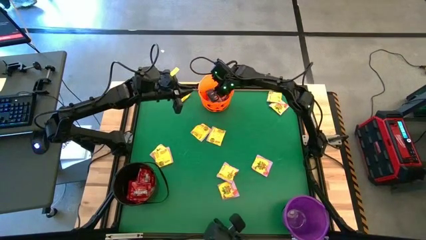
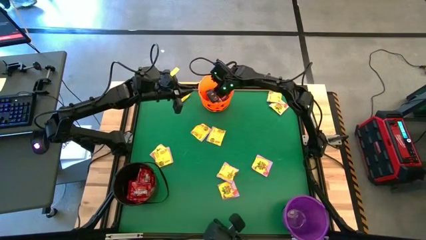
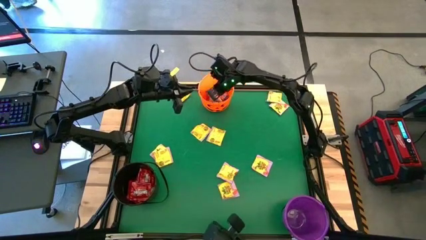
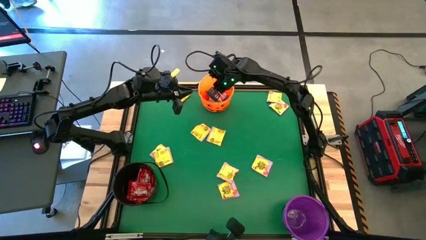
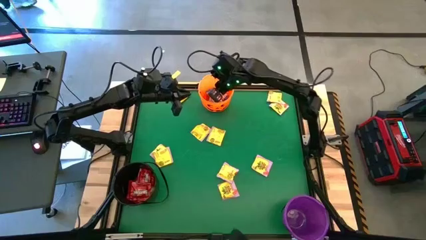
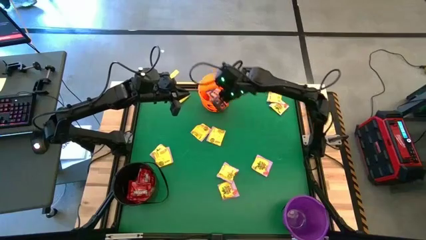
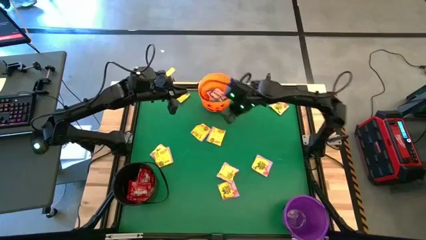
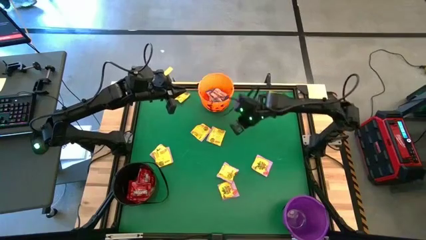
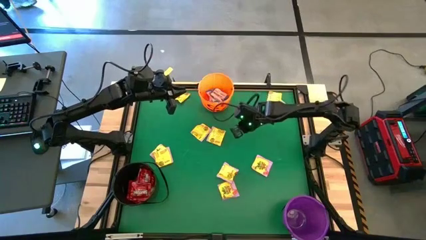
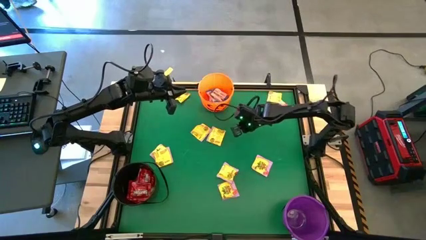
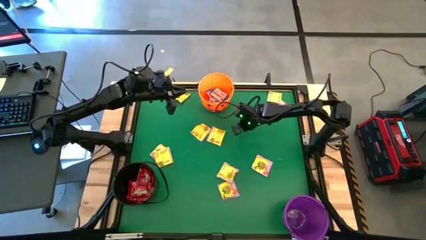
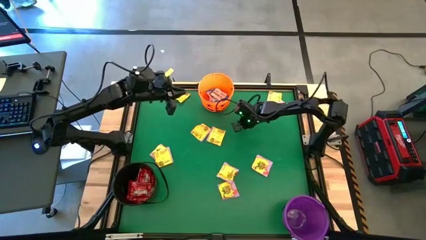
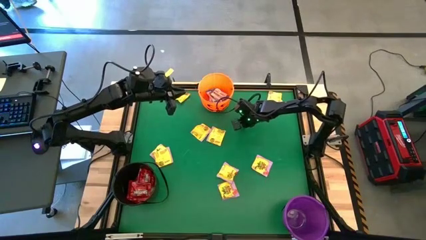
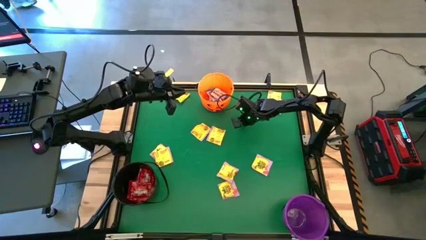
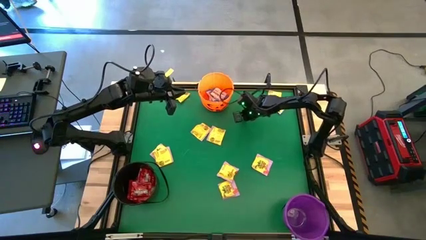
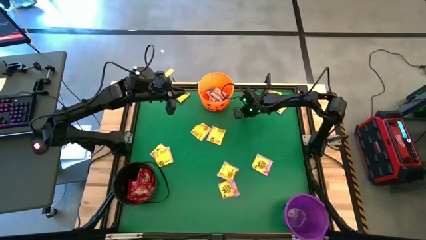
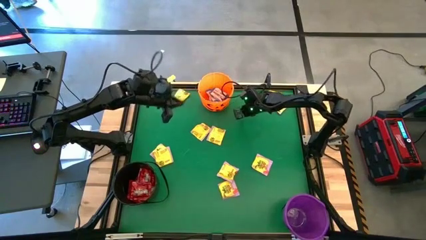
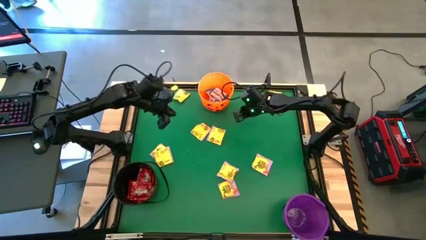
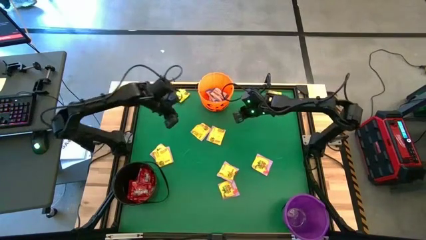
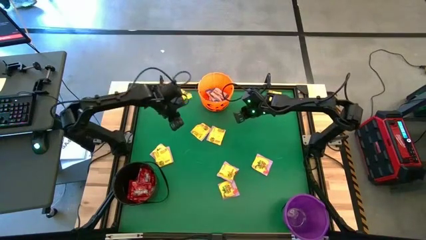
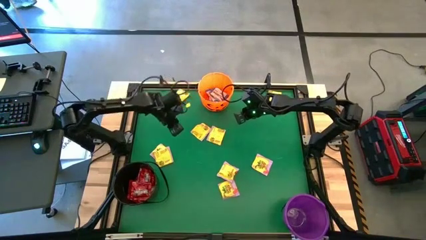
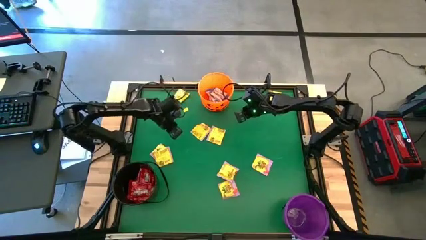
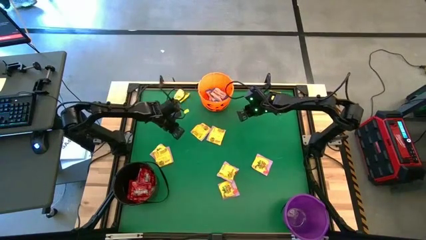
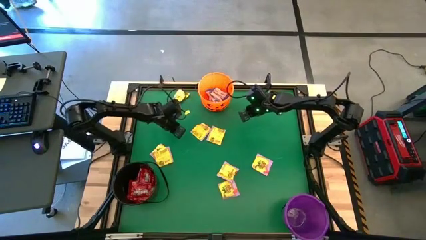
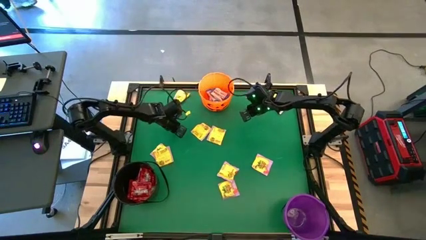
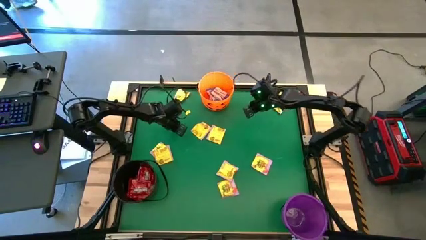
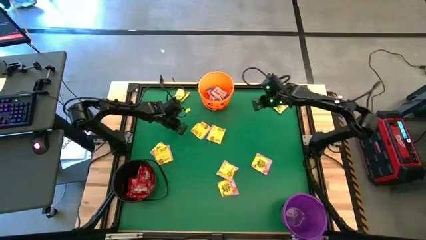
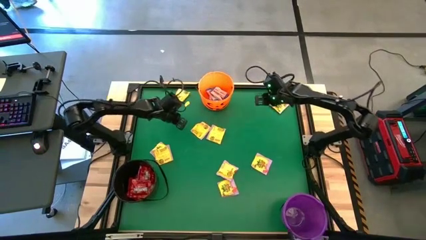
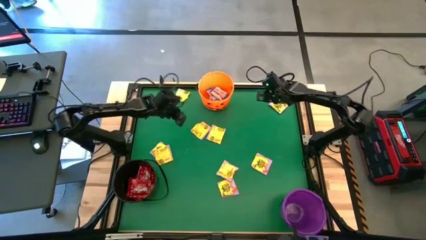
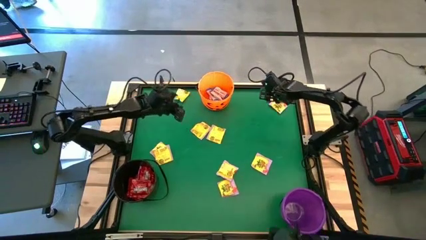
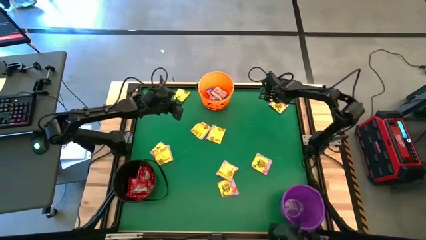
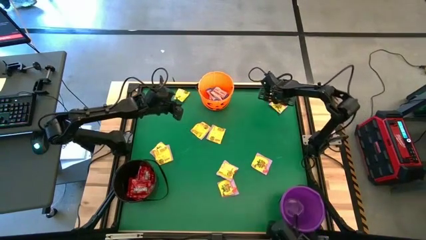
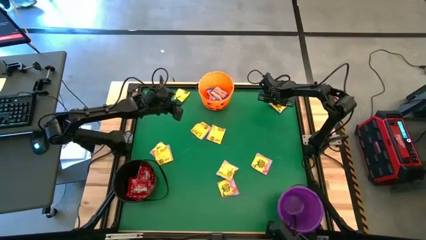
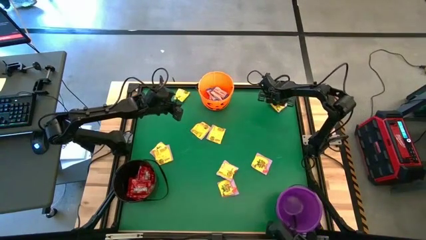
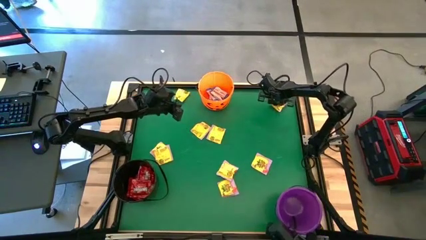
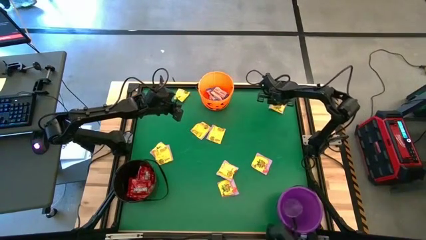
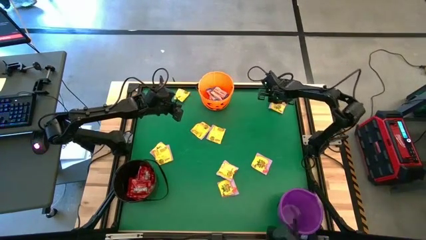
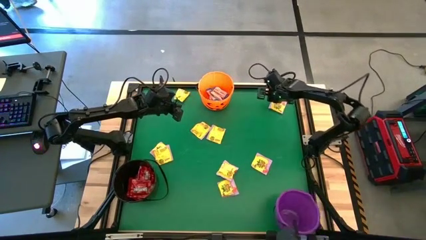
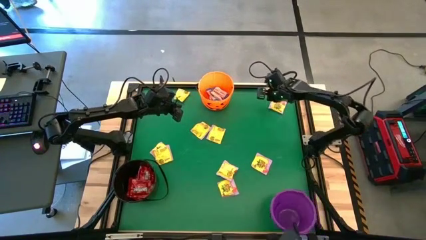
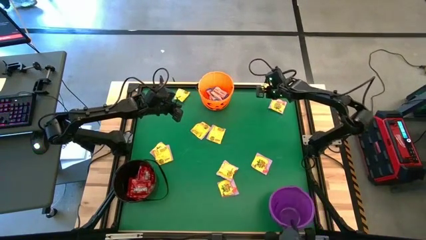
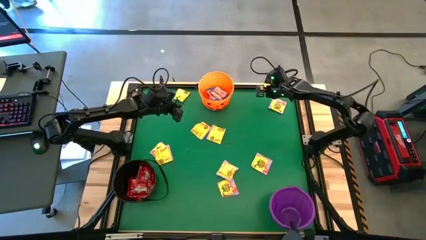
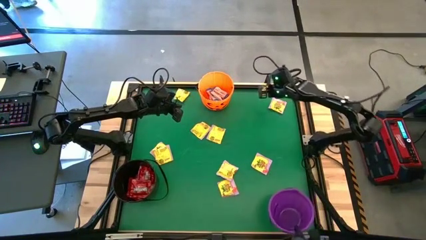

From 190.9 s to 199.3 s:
Task: Sort candy by brand, put in halloween buckets
Put the yellow candy into the purple bucket

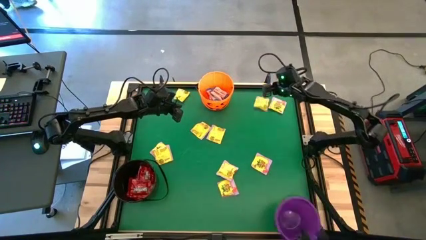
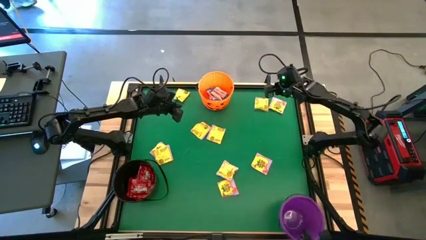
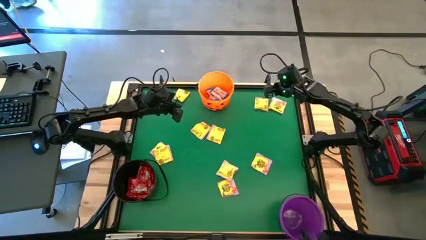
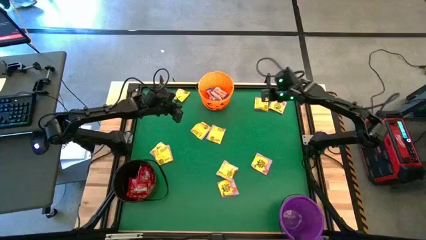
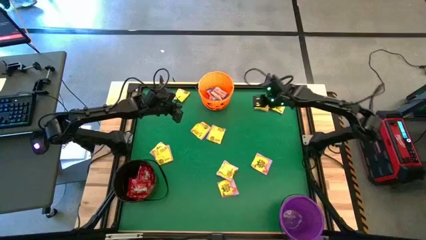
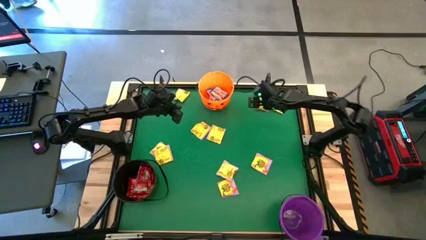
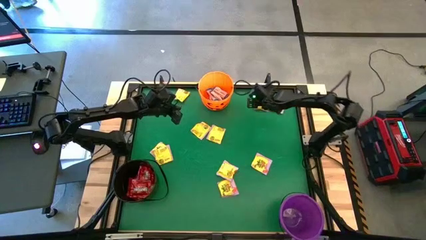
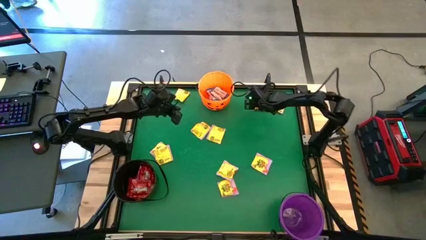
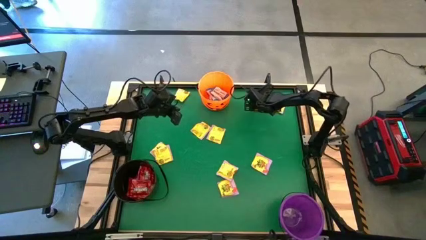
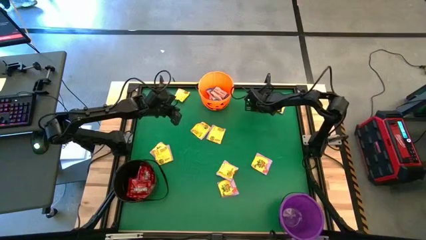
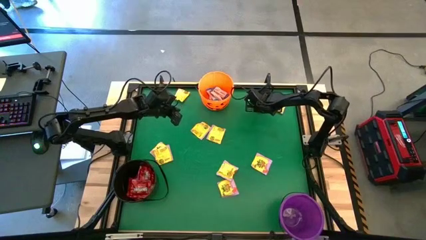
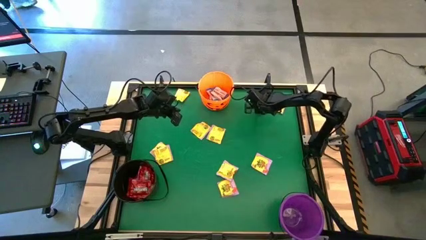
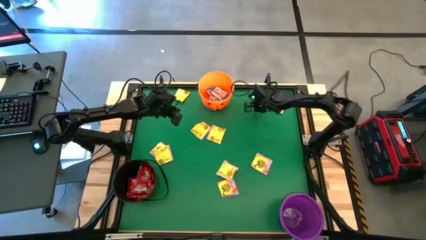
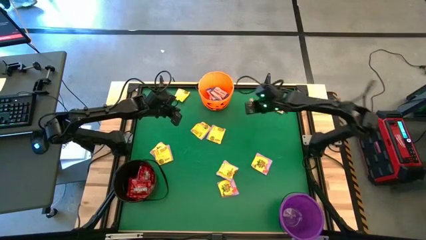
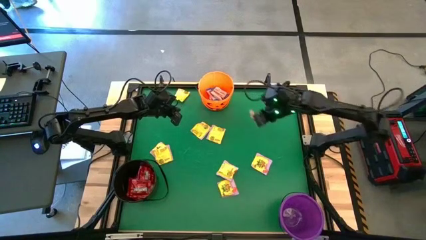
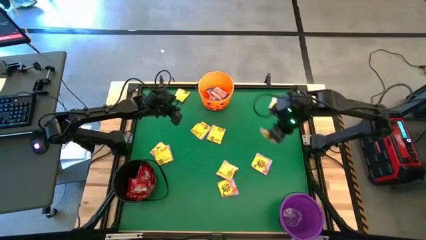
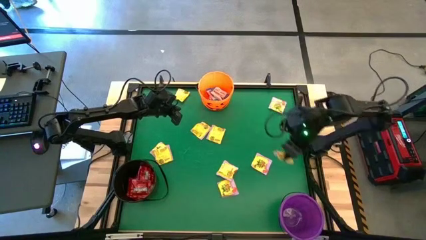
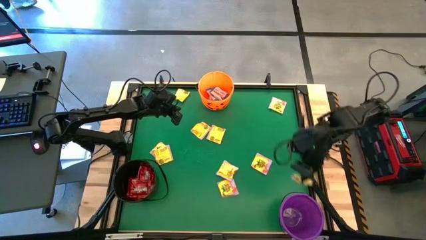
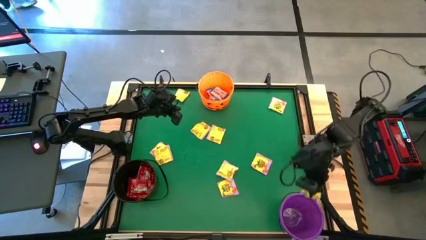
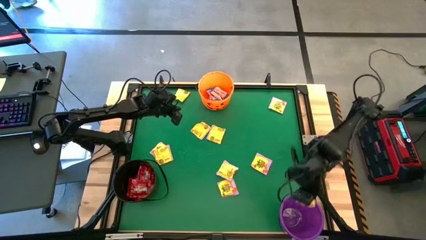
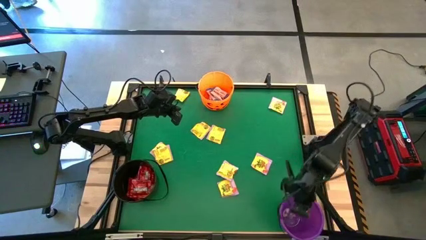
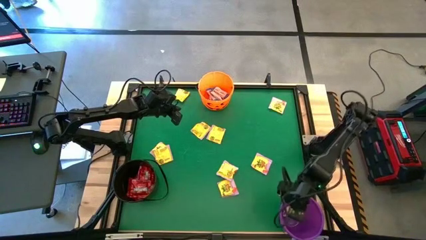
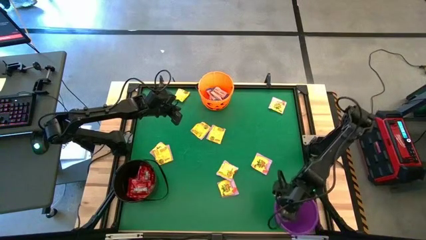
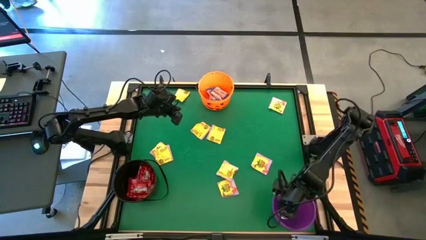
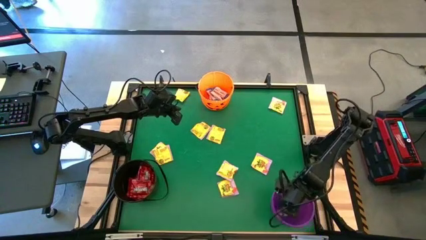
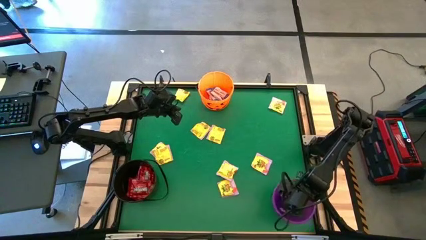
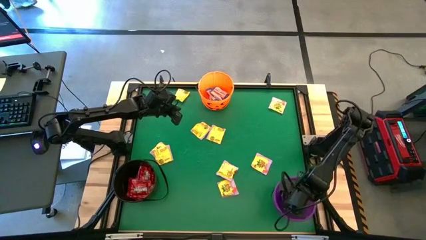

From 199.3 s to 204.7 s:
Put the yellow candy into the purple bucket

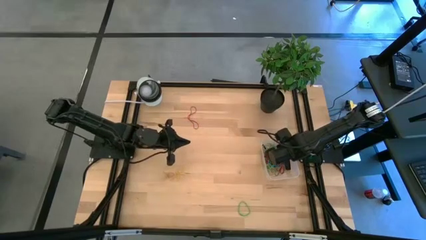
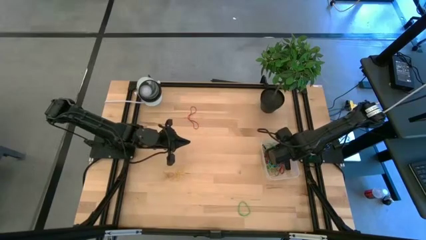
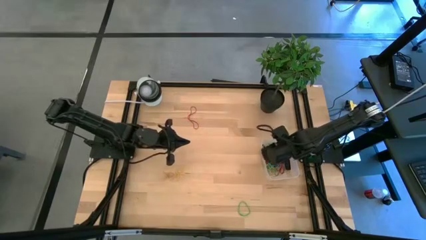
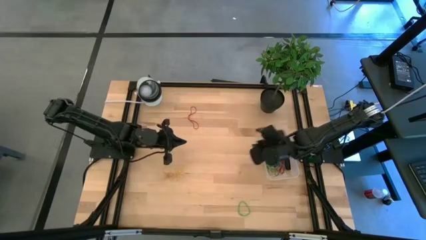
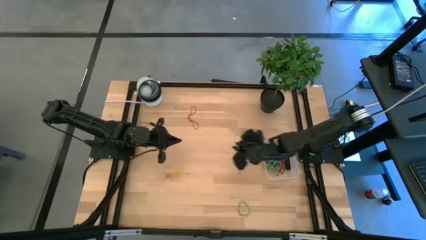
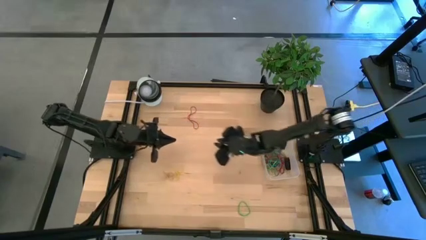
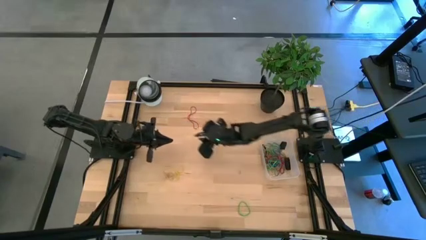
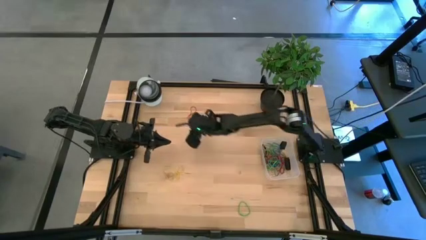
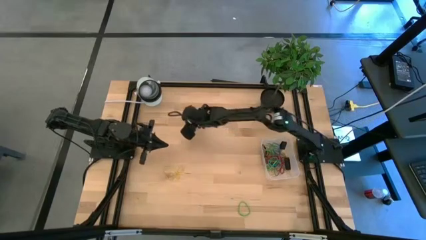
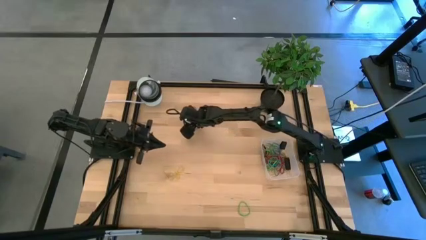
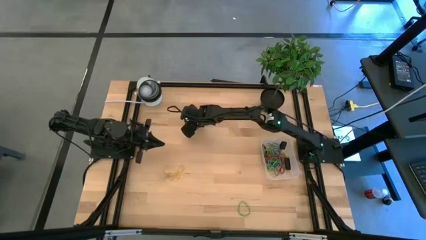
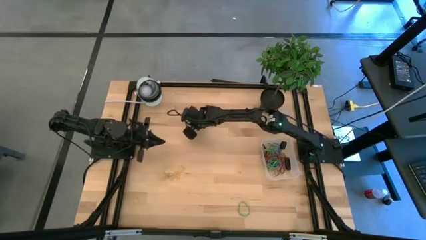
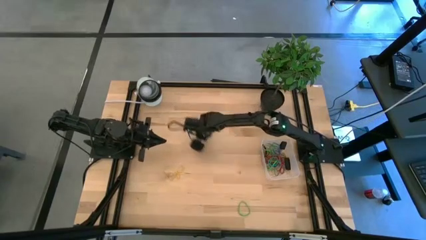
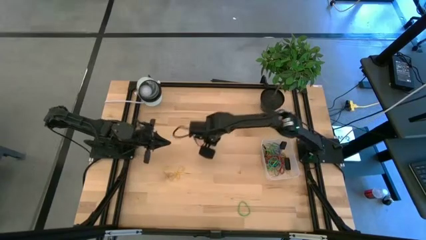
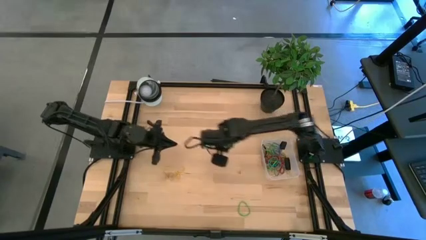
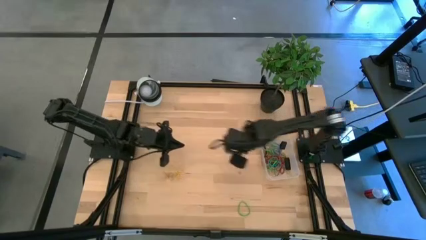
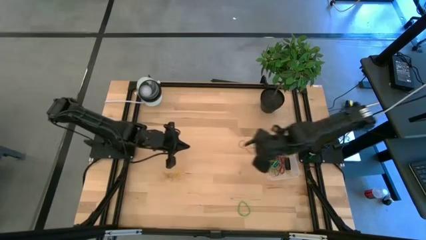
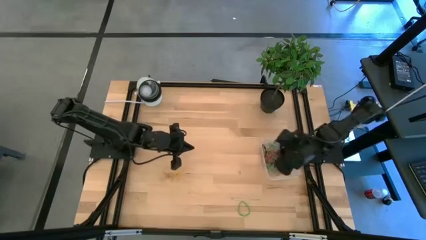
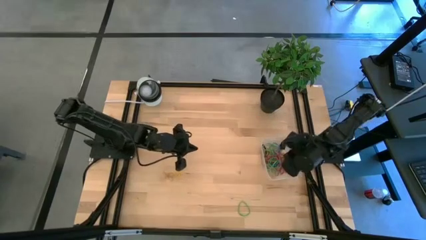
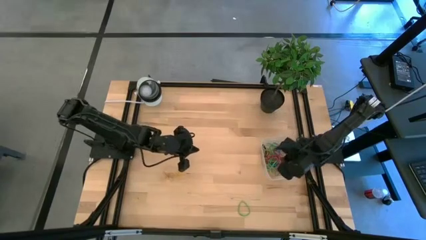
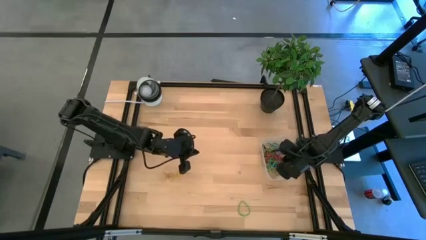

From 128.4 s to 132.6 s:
Task: Pick and place rubber bands into bin
Put the red rubber band into the transparent bin
